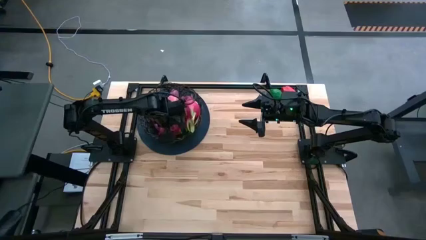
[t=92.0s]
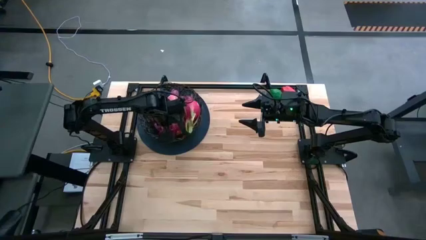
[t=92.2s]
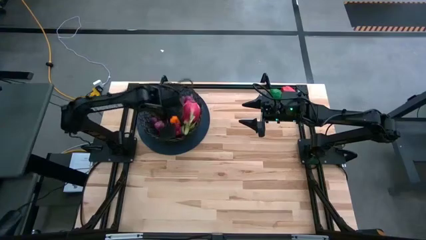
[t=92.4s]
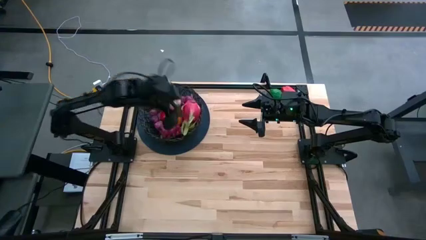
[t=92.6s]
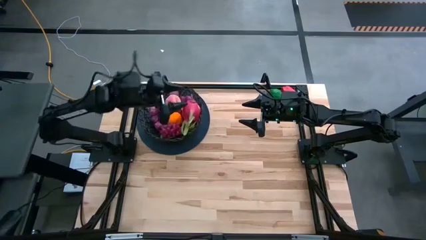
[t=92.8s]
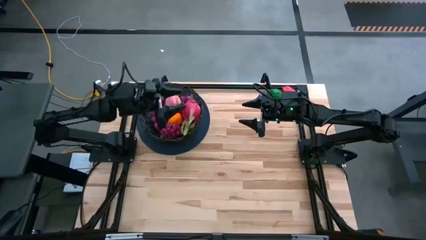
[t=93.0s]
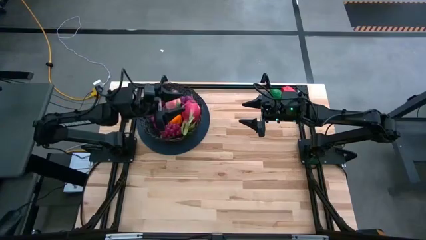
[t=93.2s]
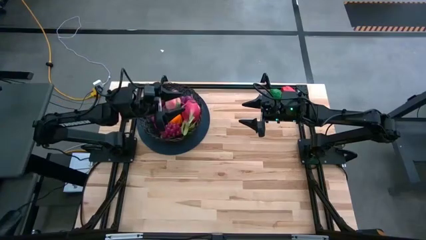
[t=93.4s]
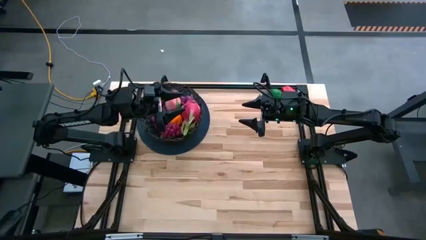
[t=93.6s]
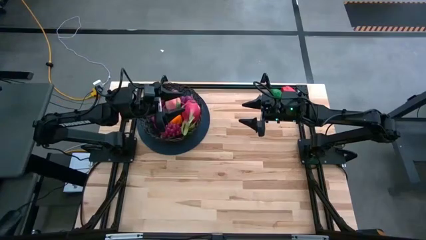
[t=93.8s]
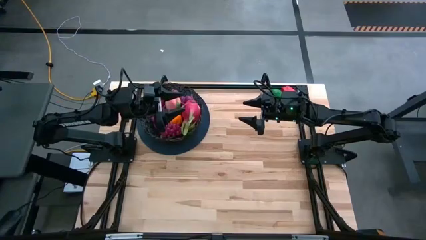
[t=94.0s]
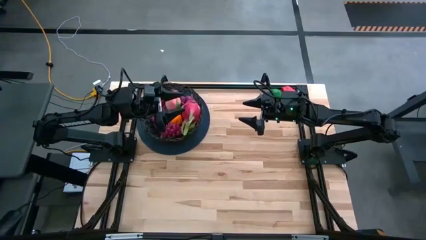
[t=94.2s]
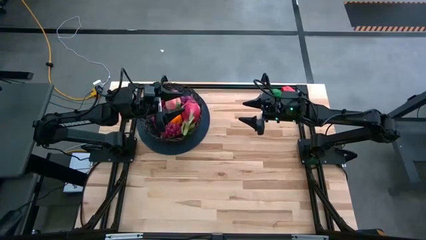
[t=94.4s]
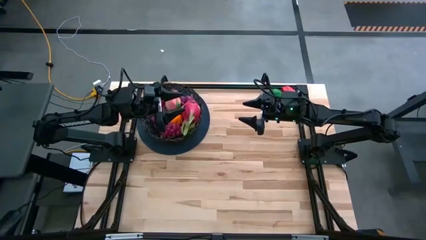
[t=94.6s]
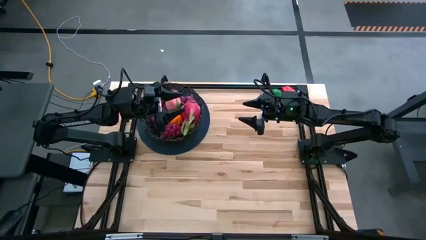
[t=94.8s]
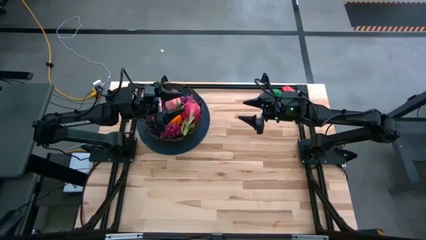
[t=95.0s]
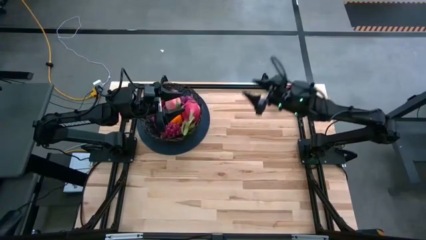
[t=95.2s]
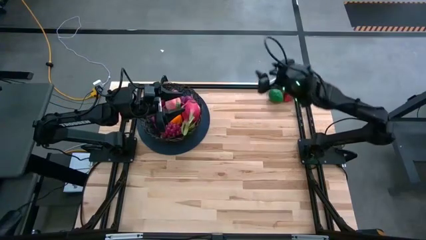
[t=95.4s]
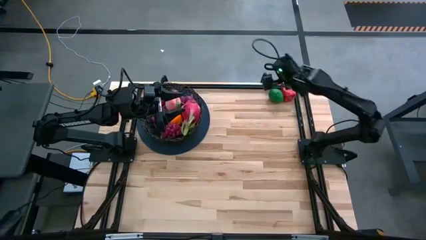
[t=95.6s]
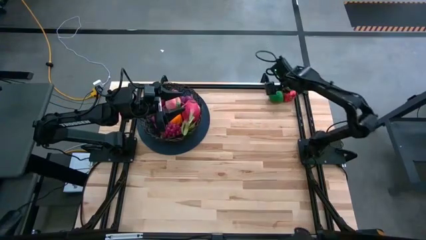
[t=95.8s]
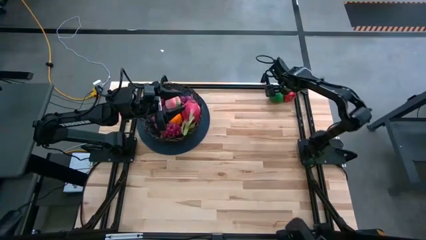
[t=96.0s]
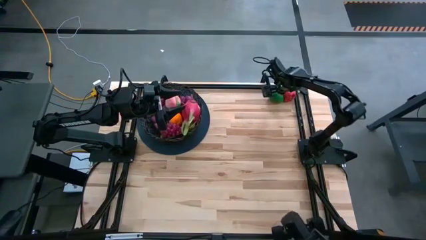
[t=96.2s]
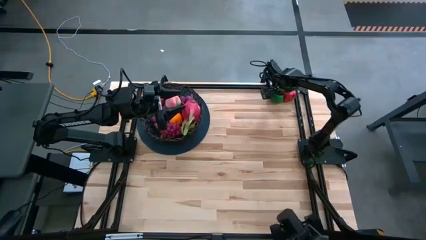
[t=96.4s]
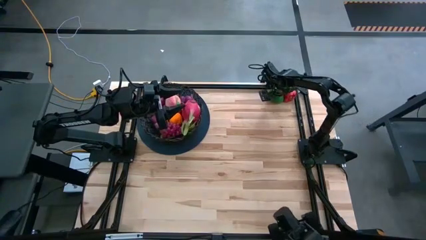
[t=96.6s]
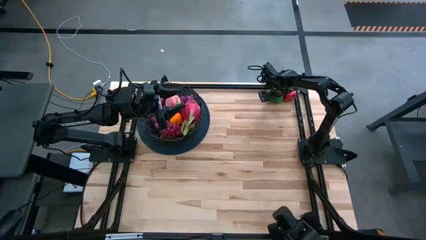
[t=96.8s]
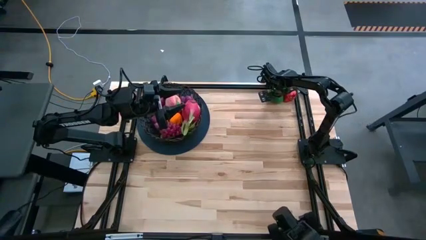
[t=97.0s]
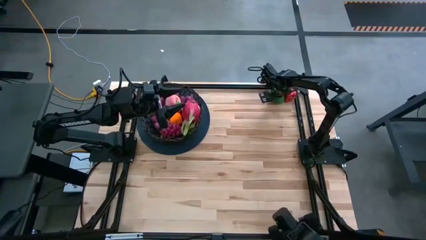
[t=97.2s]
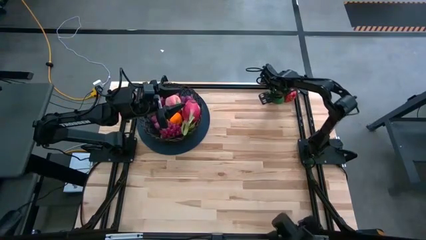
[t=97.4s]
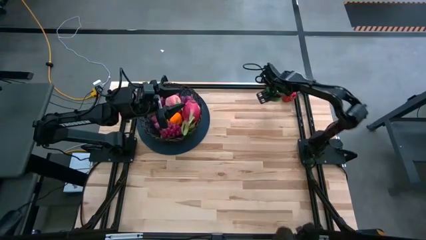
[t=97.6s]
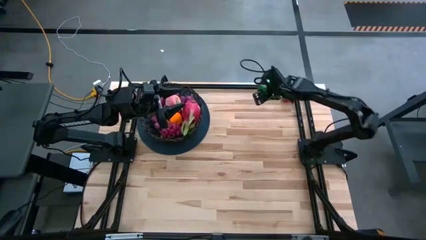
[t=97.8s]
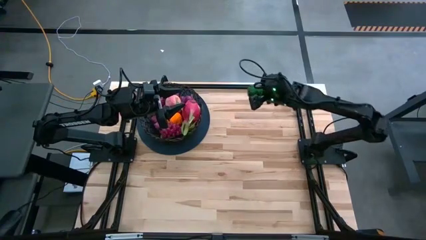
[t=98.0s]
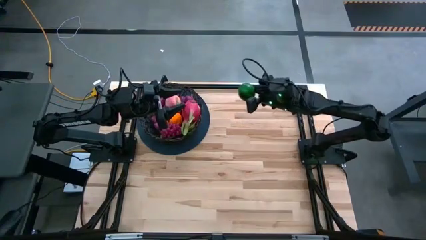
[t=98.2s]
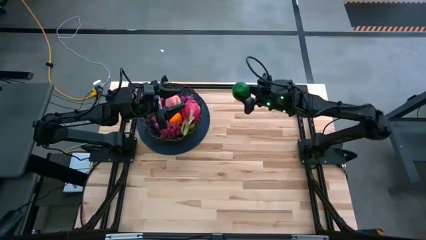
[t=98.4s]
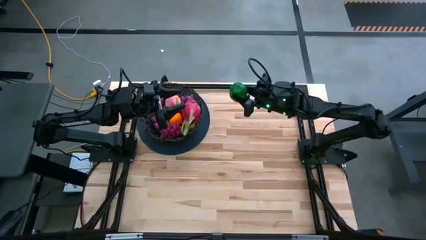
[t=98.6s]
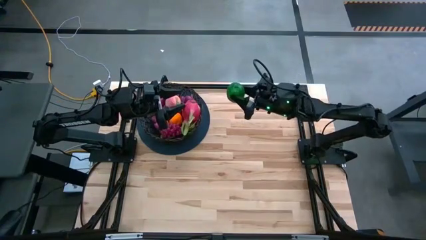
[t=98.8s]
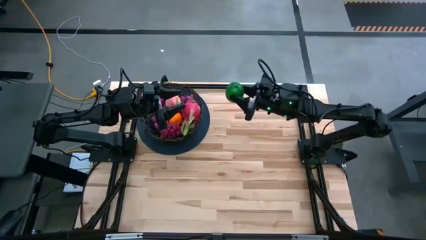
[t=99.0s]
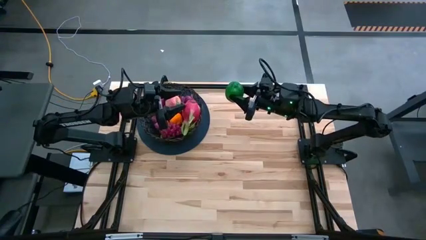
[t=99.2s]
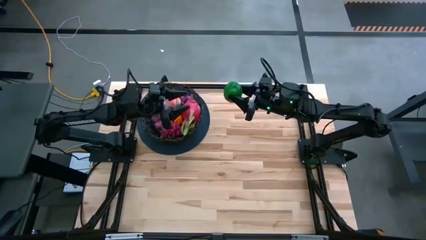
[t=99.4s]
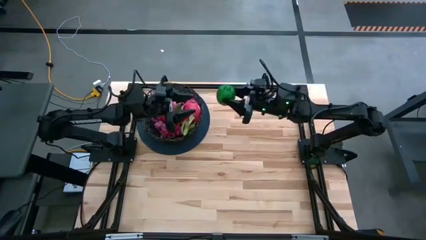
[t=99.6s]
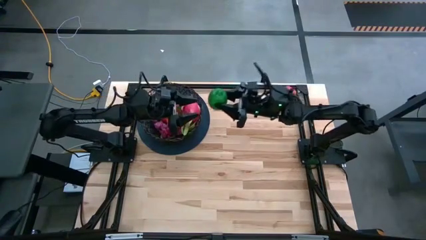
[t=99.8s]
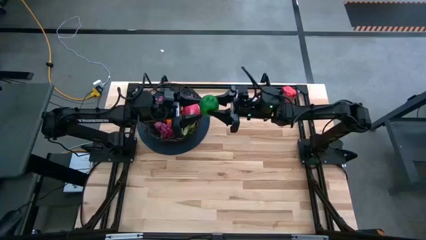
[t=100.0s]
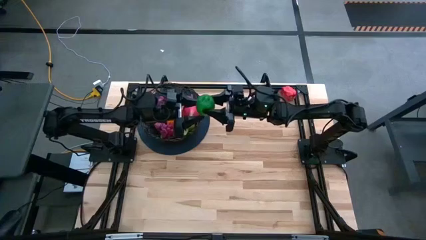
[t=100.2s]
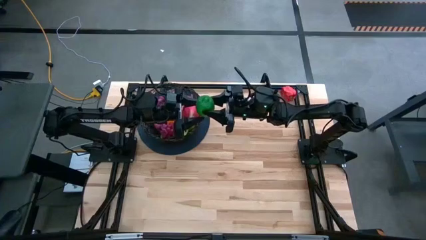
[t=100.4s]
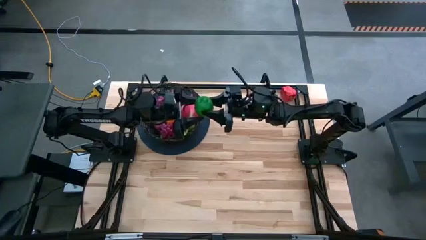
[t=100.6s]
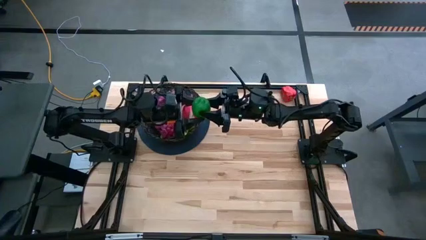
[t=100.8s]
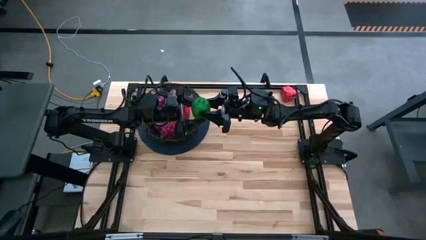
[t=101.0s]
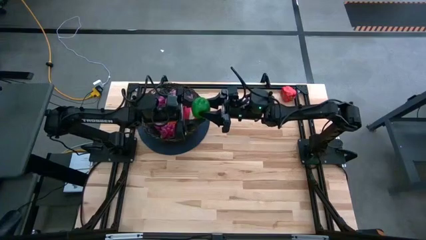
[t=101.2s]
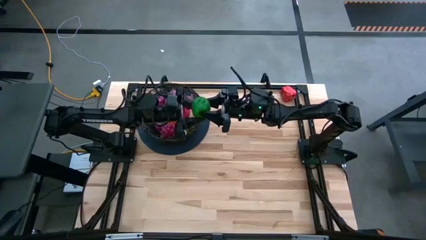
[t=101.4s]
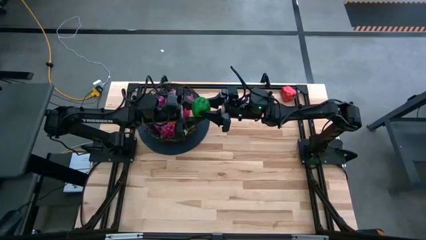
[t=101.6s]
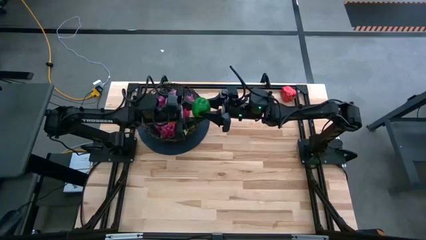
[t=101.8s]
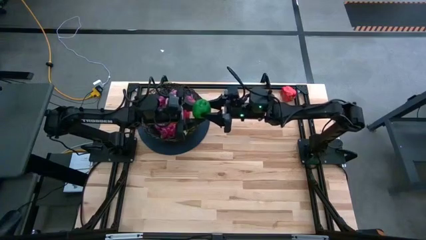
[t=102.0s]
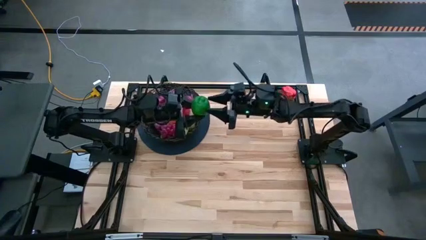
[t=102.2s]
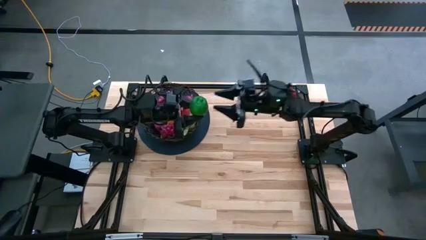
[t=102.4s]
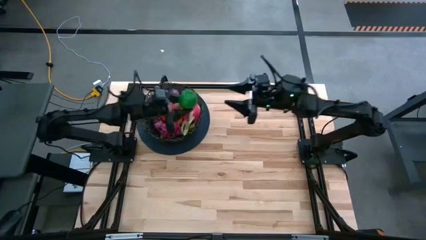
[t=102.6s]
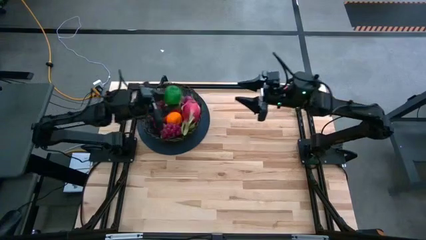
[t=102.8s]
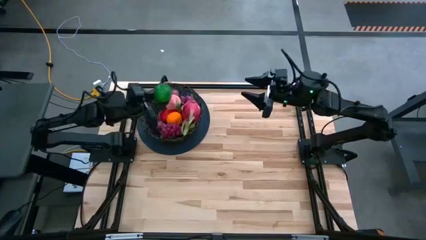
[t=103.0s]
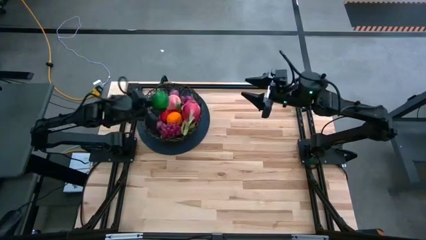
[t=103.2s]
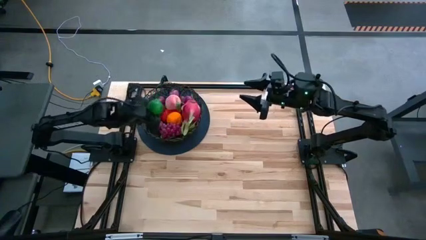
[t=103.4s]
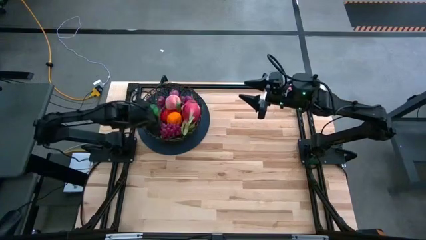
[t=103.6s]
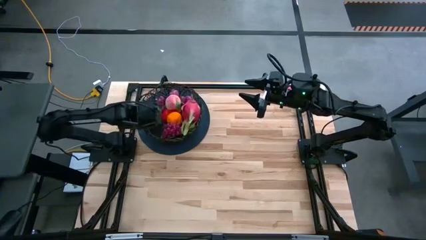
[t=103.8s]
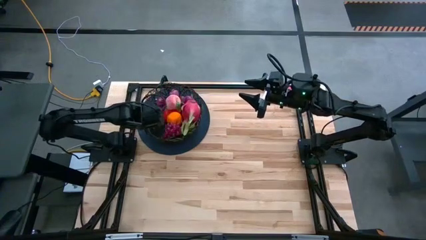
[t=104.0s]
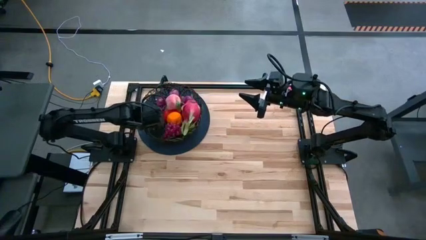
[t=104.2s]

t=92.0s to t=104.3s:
Task: Build produce basket
Put the green lime into the black wire basket

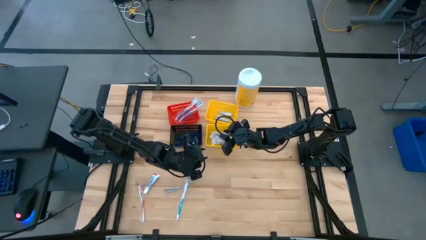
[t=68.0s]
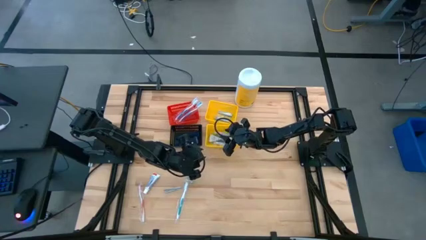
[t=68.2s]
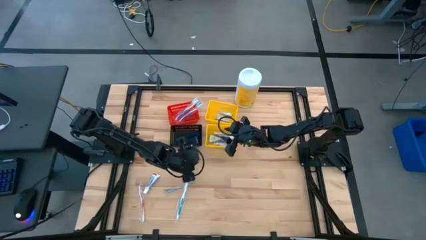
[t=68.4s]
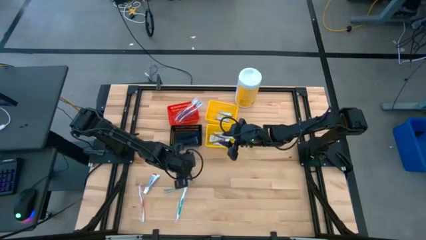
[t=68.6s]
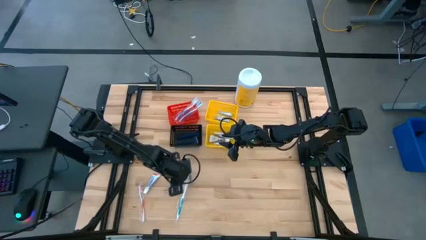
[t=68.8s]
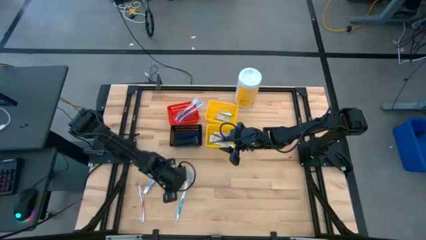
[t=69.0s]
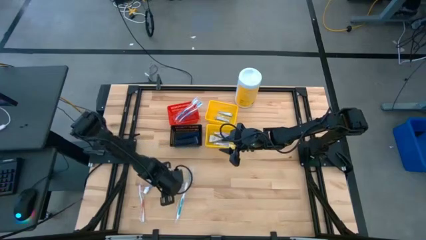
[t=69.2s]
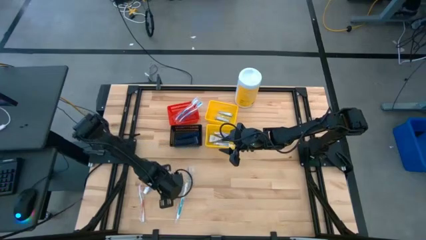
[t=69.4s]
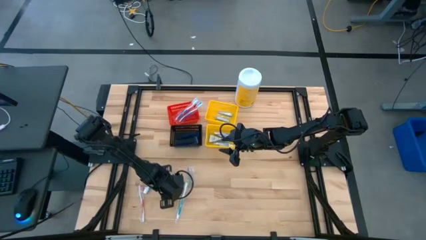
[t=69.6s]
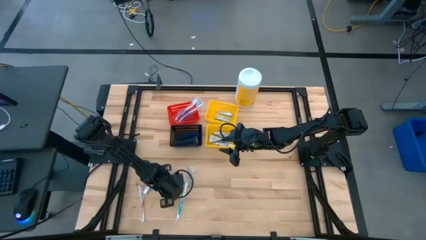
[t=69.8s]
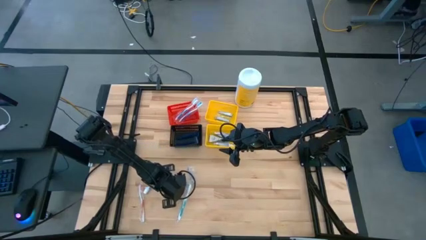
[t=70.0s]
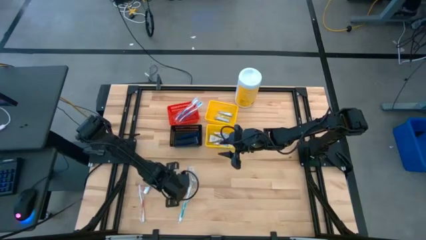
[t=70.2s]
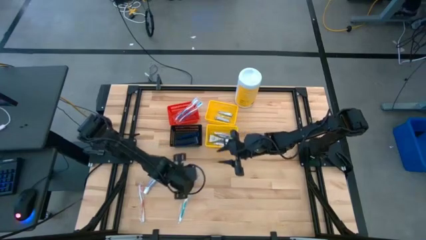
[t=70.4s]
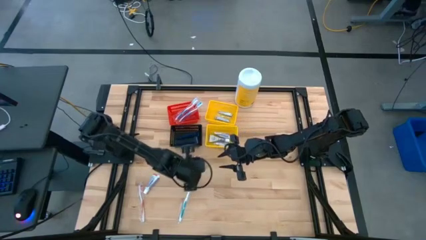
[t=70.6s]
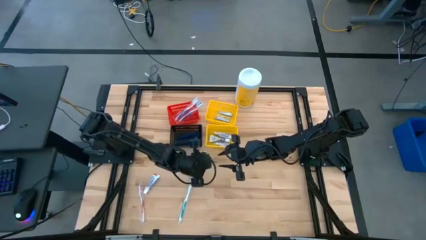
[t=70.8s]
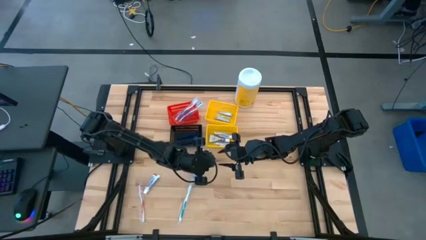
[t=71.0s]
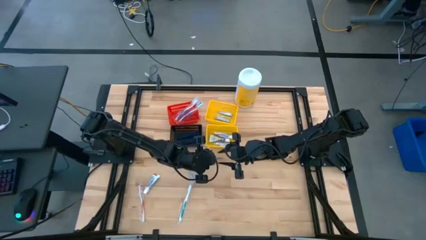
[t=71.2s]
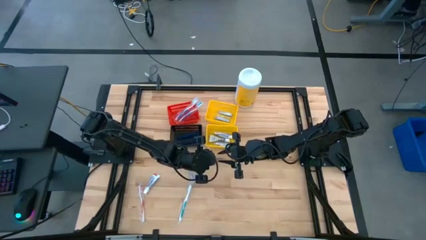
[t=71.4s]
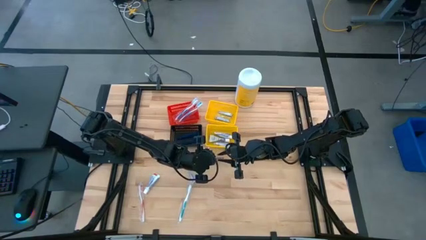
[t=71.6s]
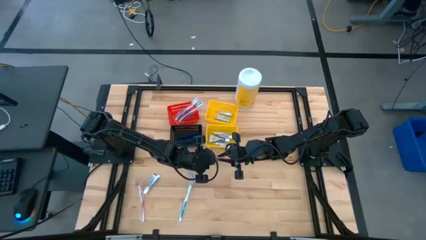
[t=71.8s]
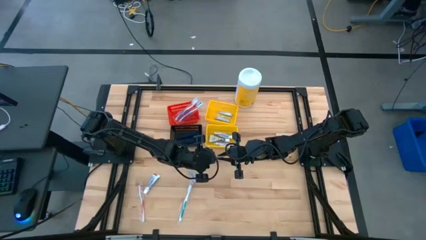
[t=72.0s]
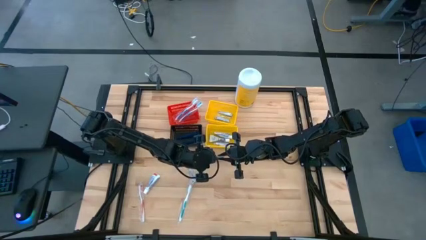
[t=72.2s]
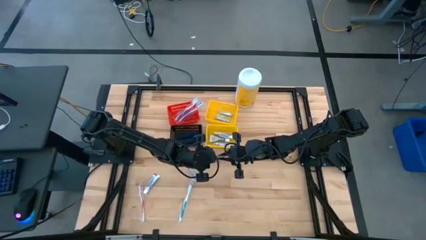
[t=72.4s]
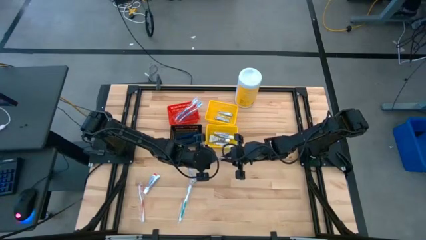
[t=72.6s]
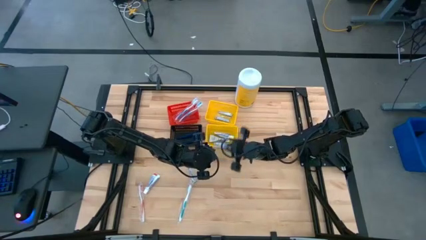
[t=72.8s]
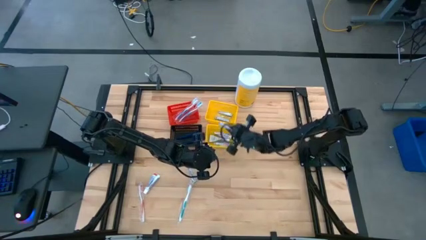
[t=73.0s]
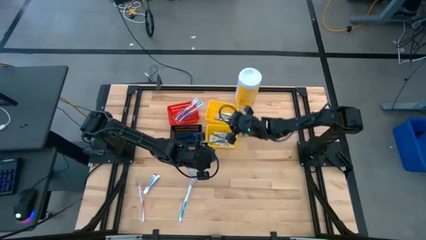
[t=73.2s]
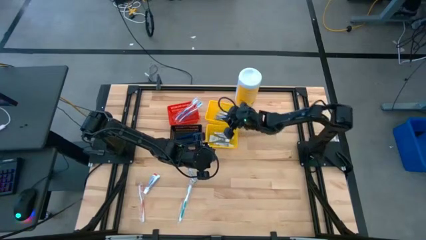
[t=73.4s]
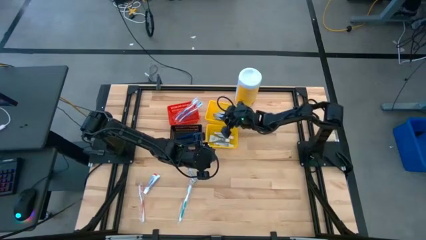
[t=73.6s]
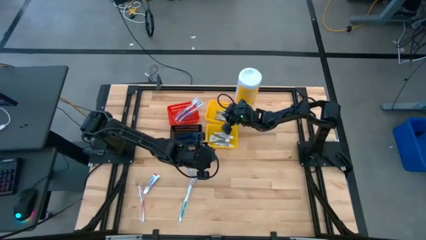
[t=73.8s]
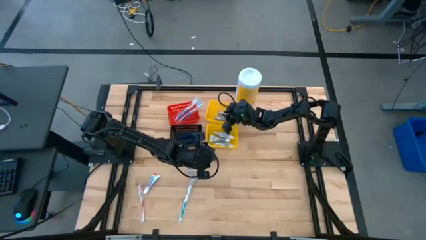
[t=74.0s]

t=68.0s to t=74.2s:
Task: Pick & Place Travel size toiletries
Put the silver nail cutter into the top yellow bin
